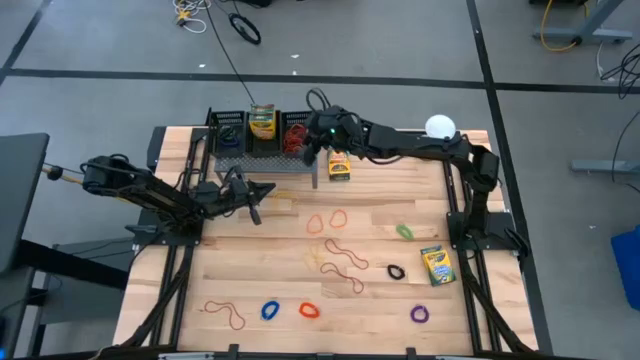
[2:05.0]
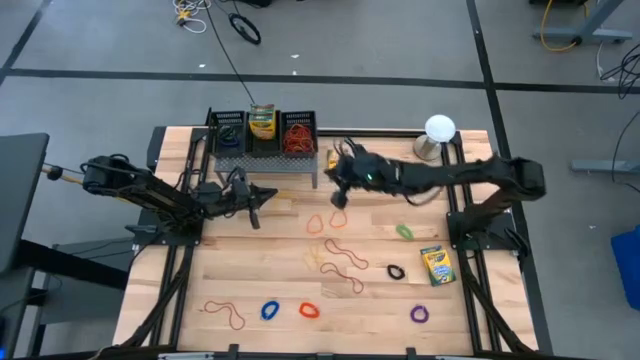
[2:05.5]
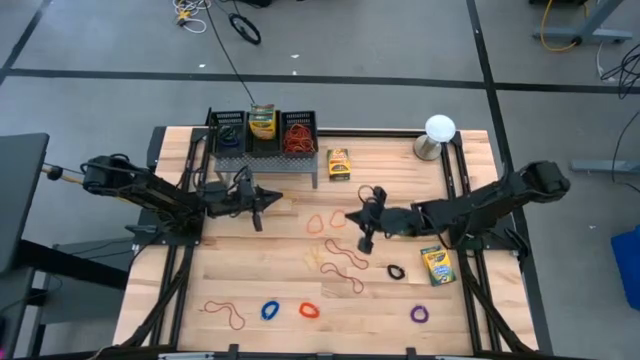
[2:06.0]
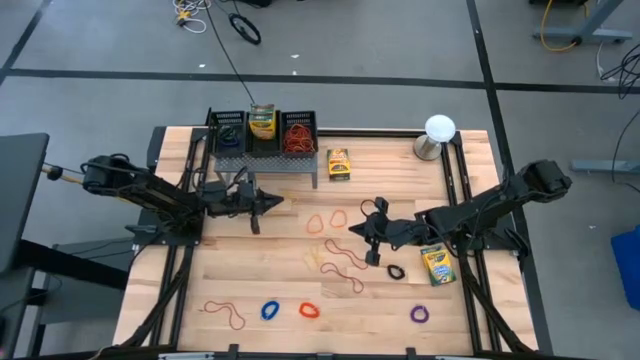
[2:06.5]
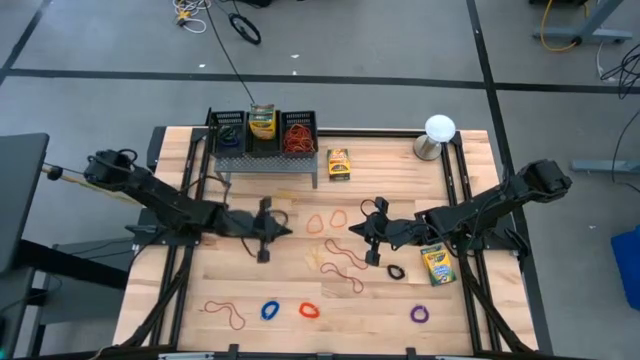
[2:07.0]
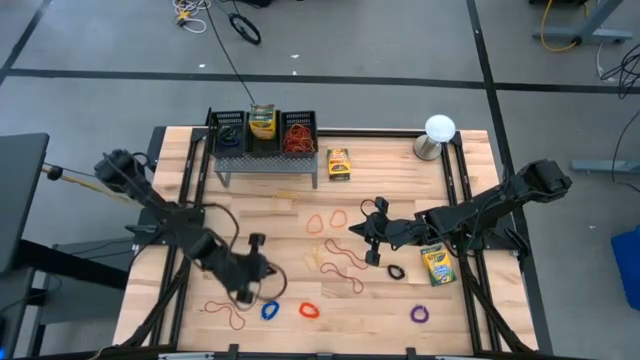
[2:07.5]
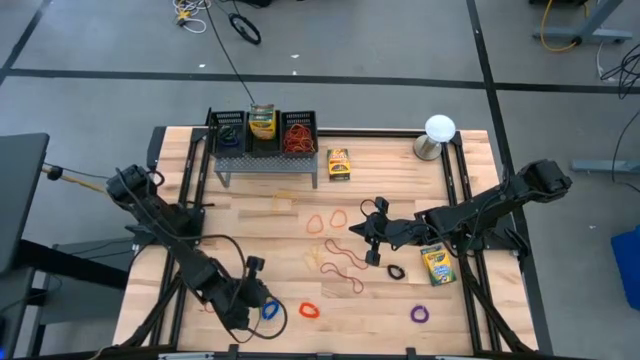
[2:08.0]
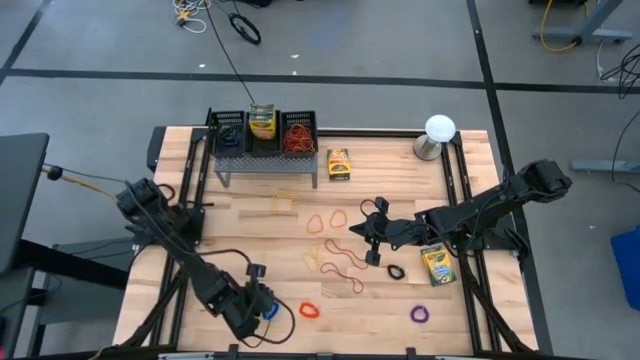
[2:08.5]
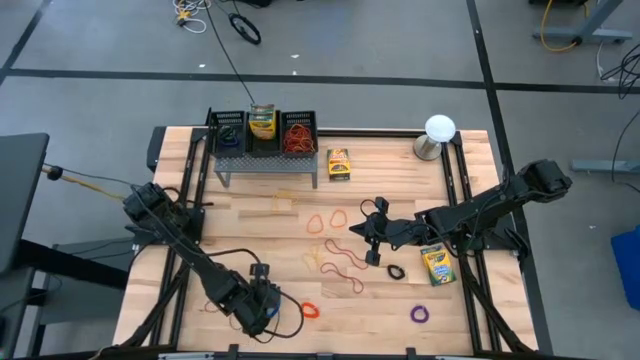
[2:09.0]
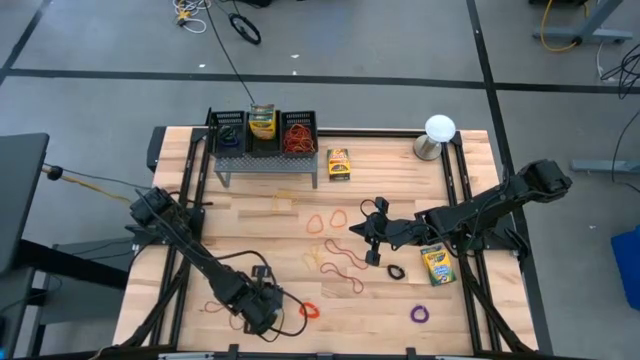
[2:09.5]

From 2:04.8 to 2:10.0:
Task: Pick & Place Office Desk Supplies
Put the blue spiral keychain into the left black bin

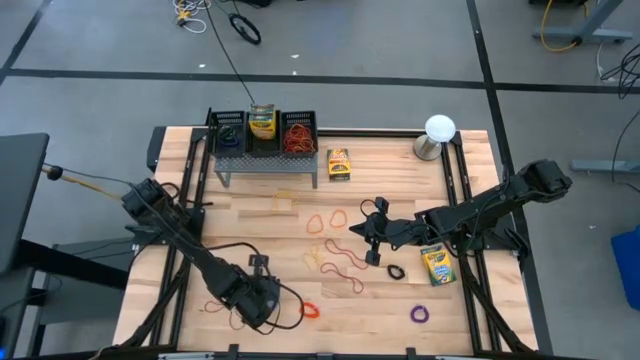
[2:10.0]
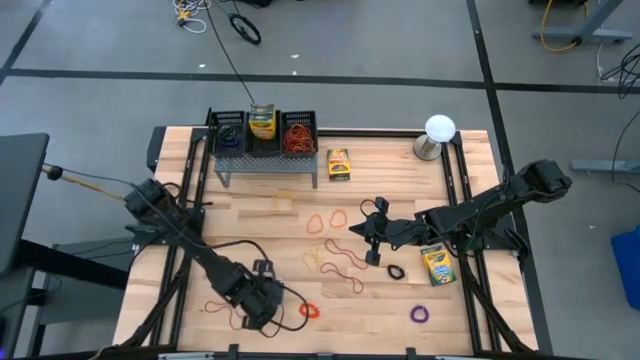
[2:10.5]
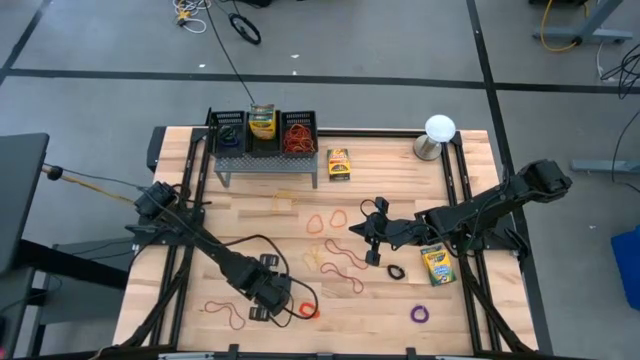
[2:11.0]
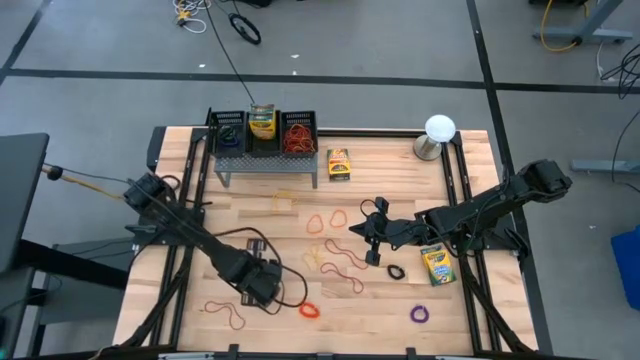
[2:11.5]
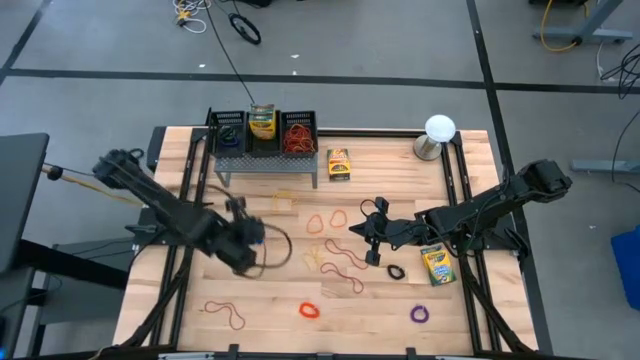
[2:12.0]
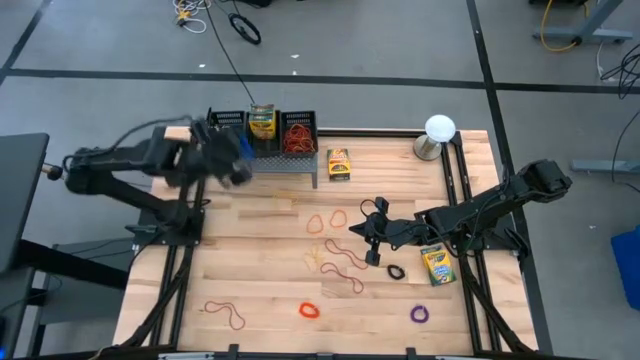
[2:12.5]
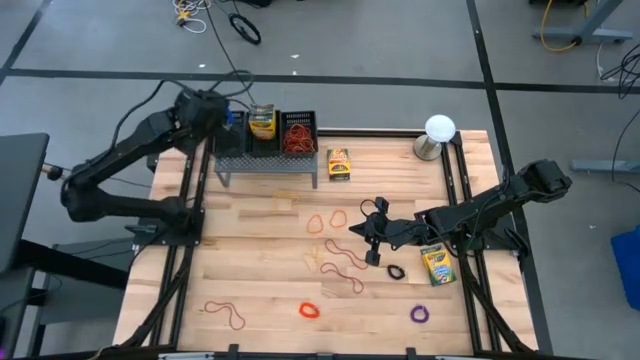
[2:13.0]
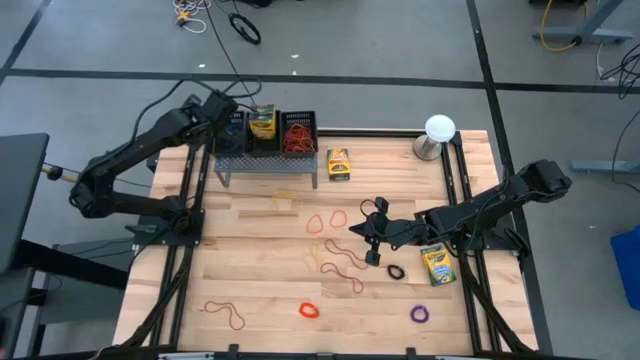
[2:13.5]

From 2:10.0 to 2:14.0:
Put the blue spiral keychain into the left black bin

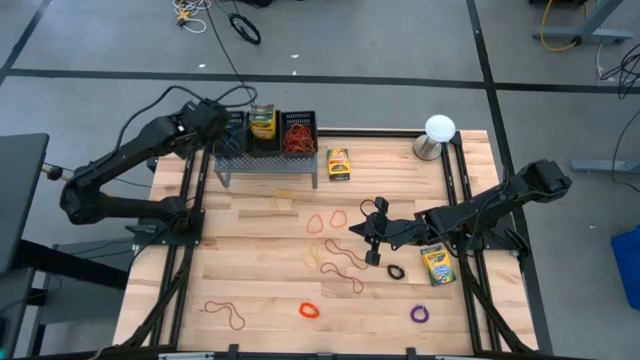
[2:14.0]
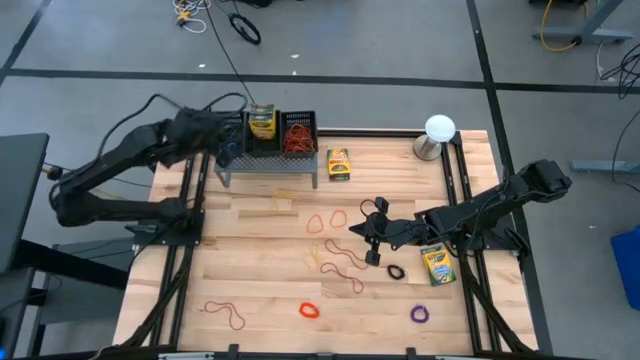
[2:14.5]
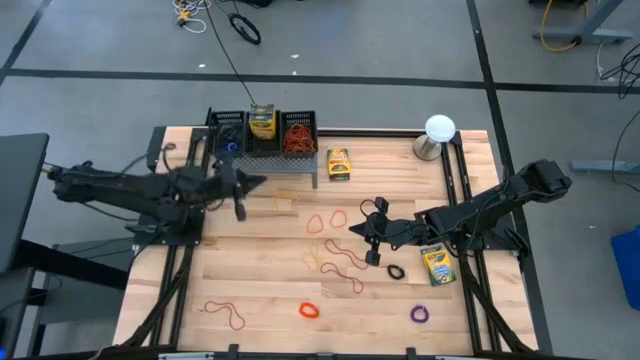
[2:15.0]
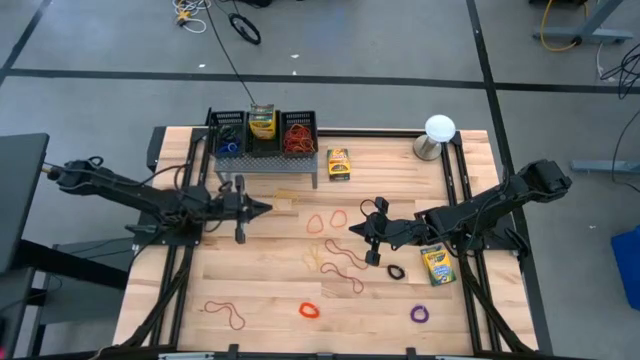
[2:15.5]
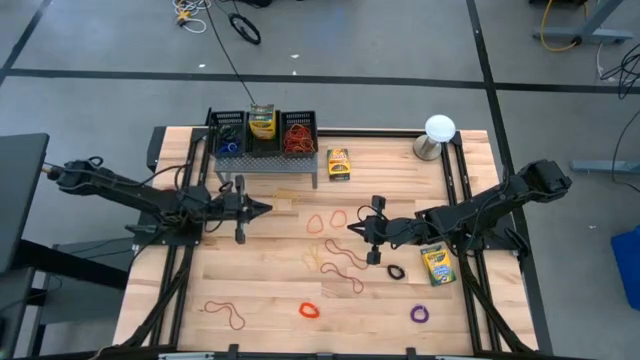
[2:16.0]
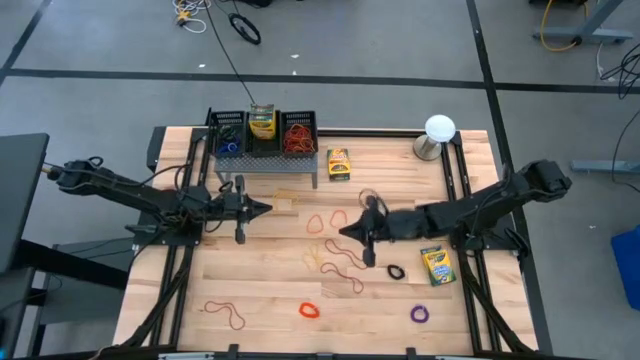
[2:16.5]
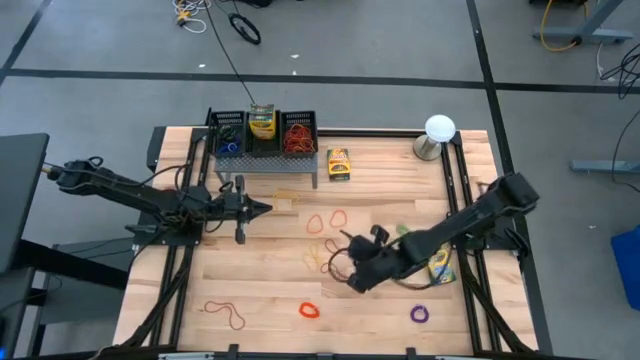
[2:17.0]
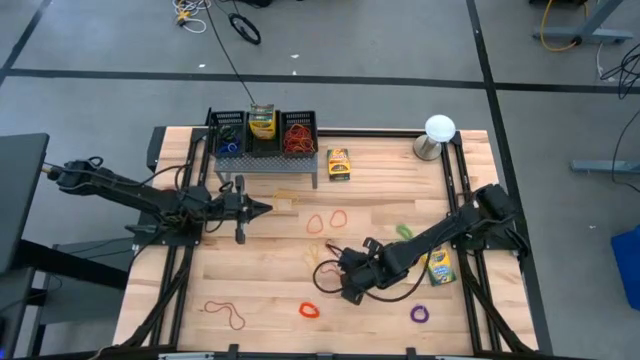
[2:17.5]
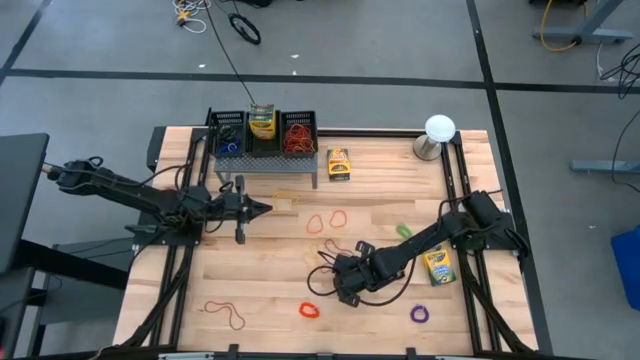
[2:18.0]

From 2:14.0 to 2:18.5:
Put the red rubber band into the right black bin

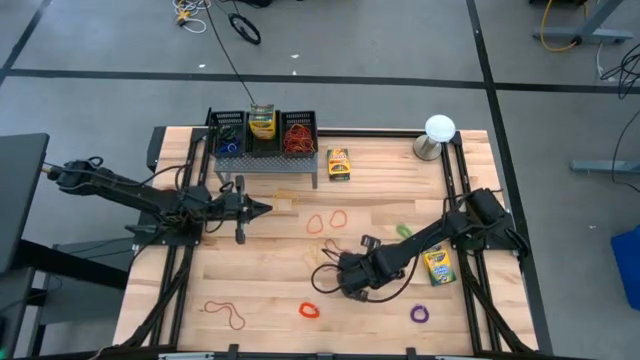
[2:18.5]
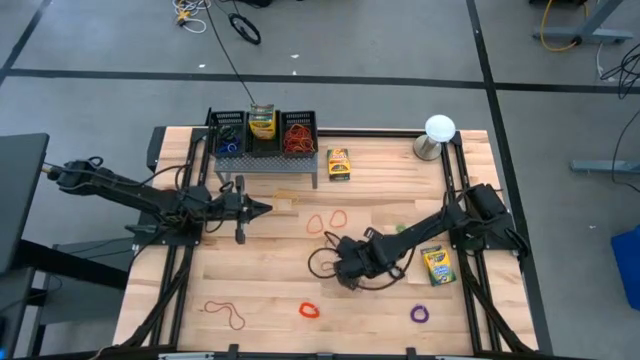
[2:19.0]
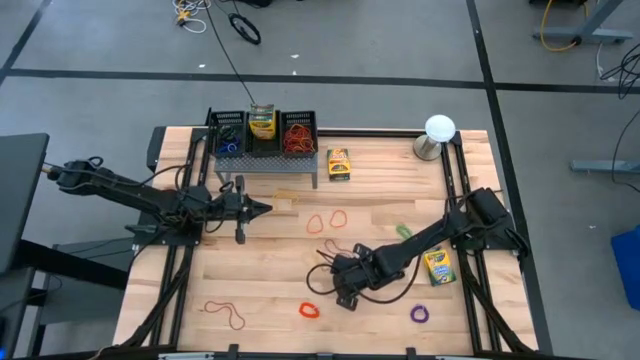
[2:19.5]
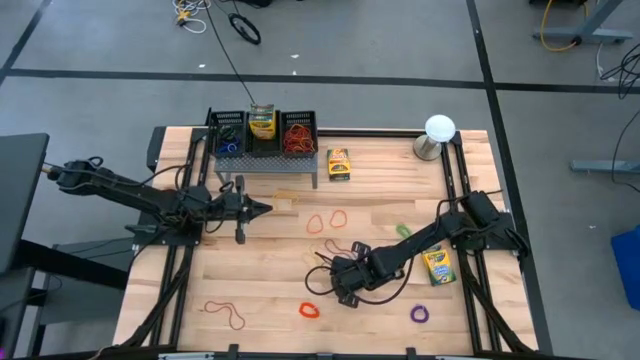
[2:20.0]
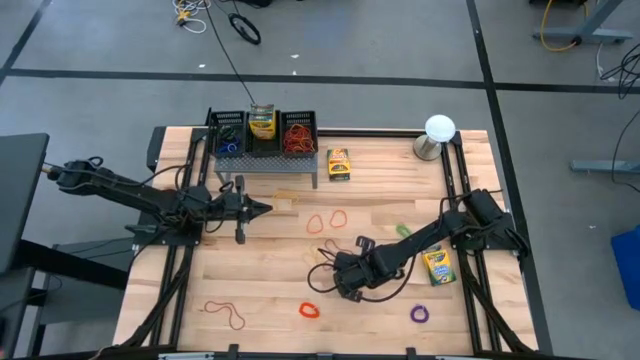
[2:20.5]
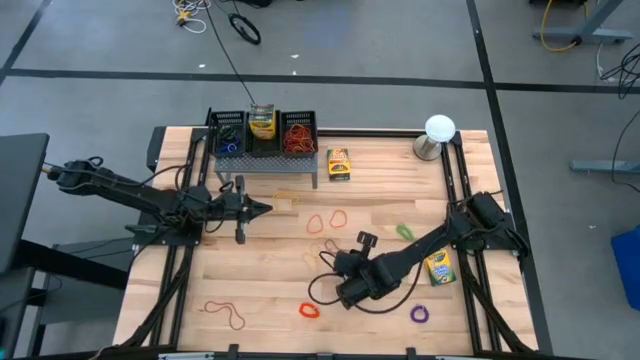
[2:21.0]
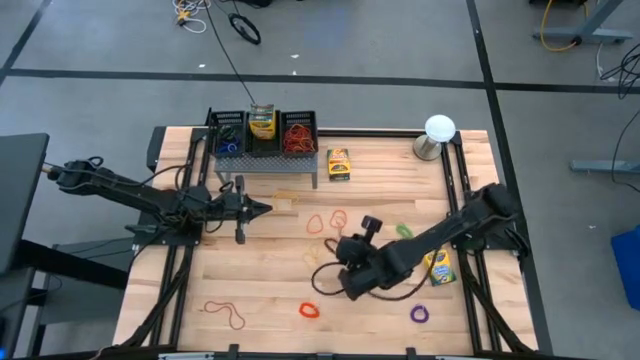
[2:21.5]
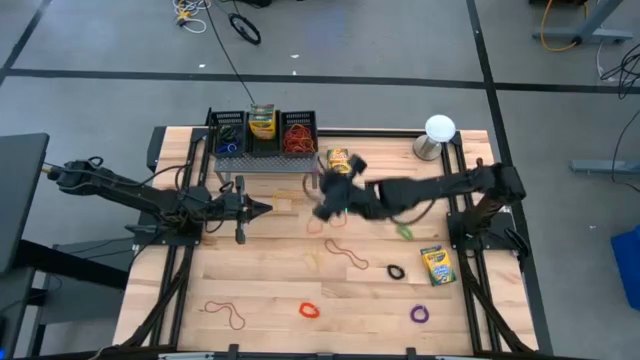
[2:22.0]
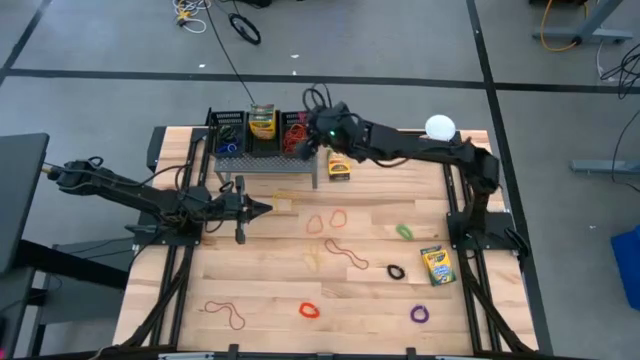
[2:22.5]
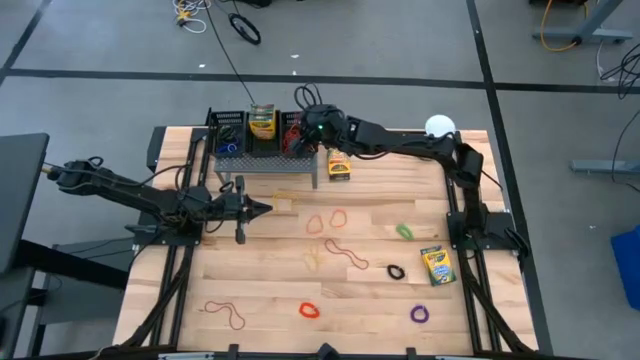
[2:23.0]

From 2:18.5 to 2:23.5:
Put the red rubber band into the right black bin

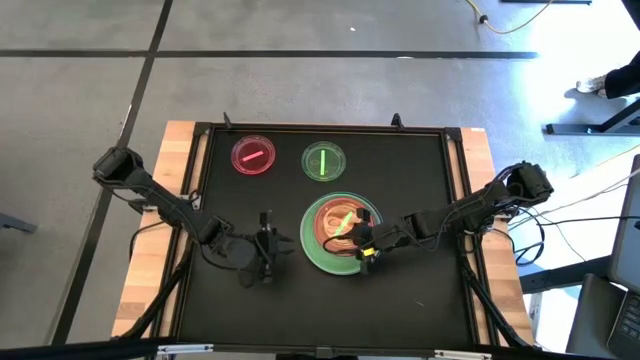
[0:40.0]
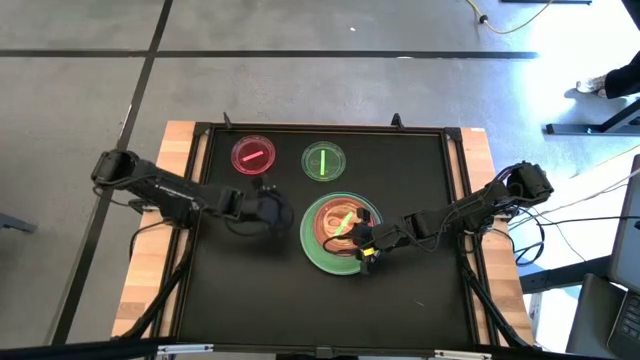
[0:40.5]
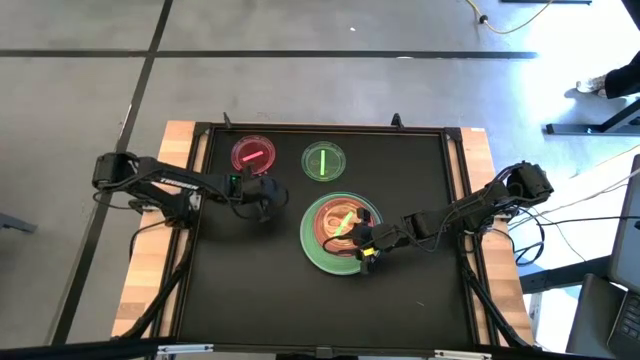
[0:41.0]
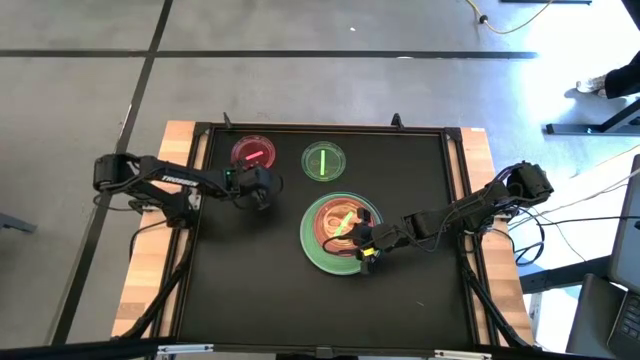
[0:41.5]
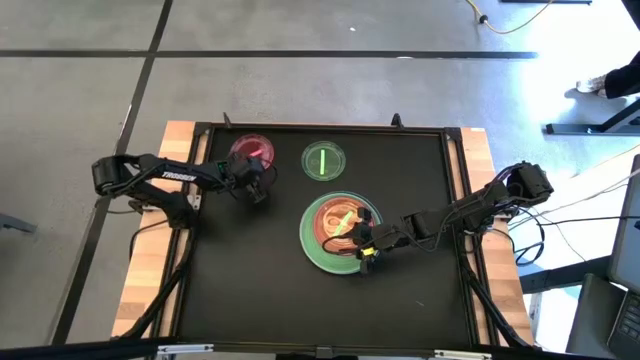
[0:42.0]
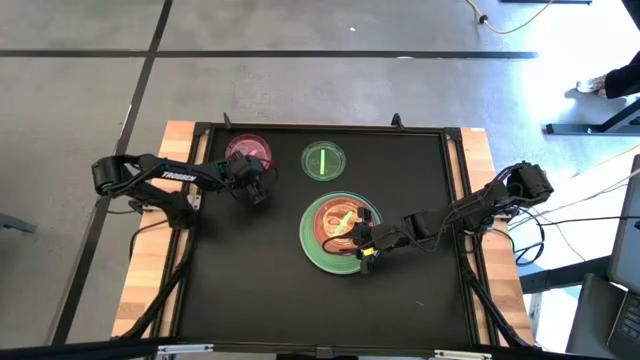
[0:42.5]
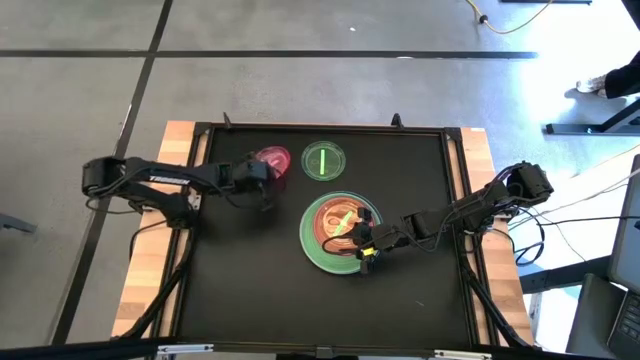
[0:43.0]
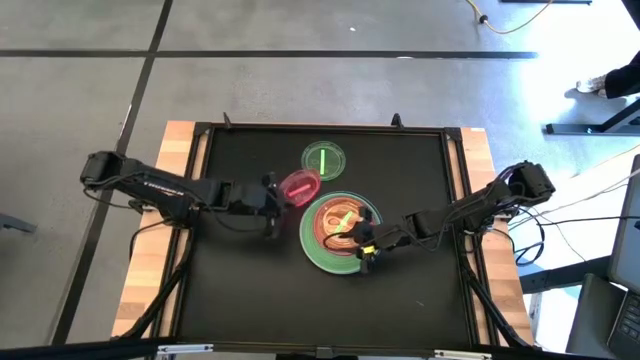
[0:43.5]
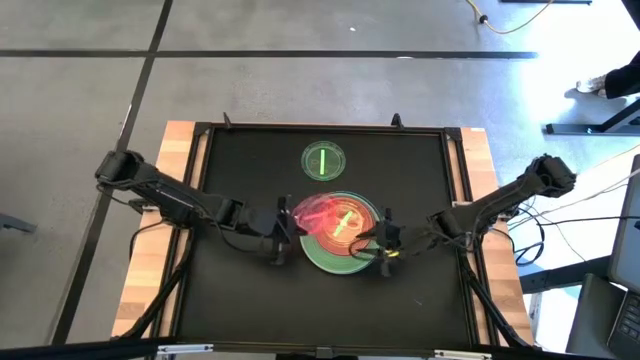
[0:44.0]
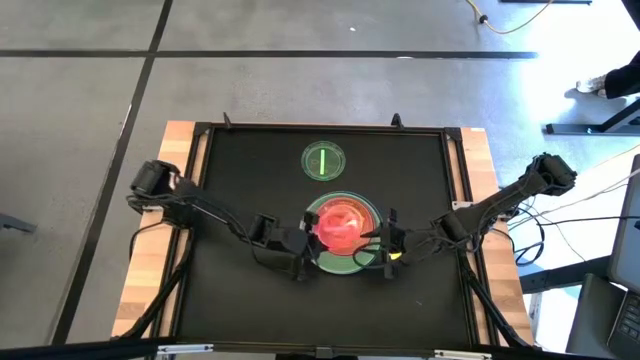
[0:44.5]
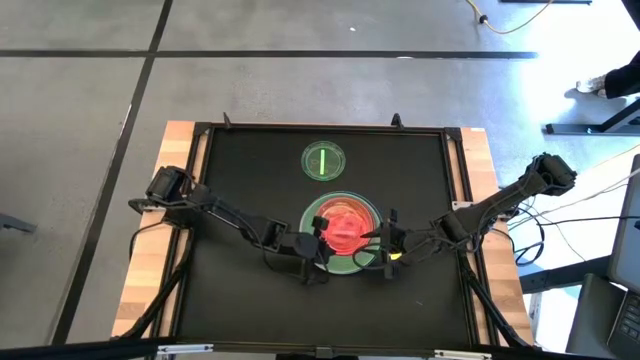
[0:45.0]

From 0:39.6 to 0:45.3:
Task: Stack plastic plates
Stack the transparent pink plate on the transparent green plate
